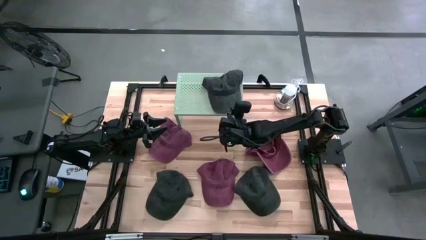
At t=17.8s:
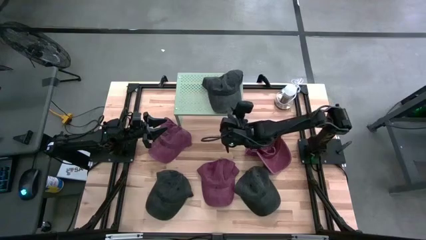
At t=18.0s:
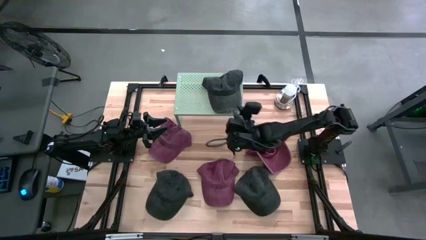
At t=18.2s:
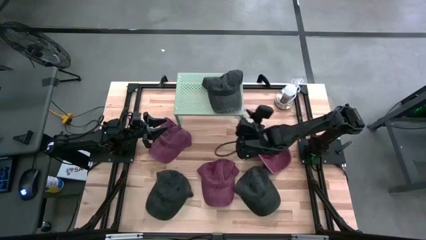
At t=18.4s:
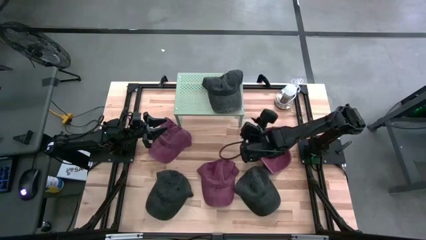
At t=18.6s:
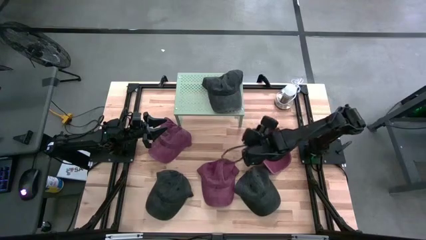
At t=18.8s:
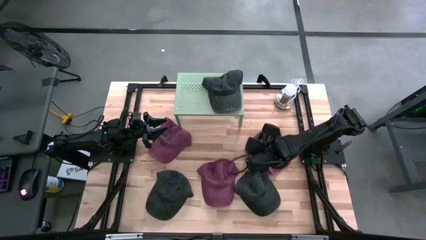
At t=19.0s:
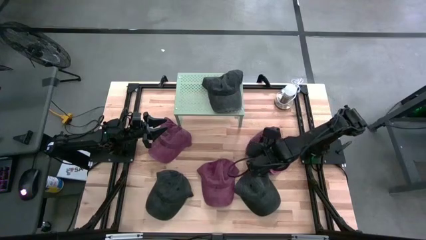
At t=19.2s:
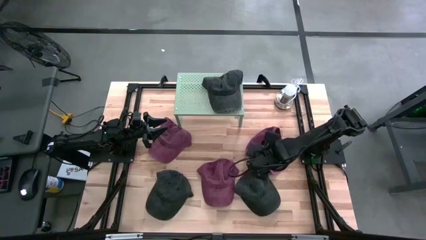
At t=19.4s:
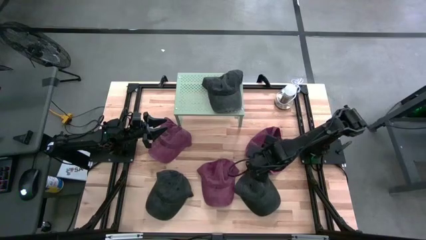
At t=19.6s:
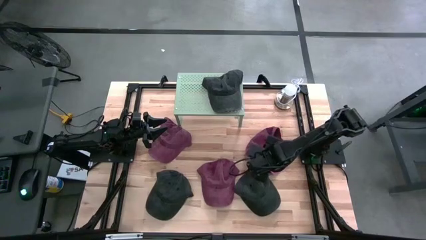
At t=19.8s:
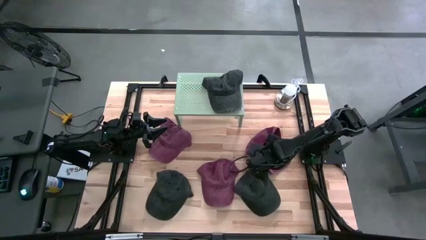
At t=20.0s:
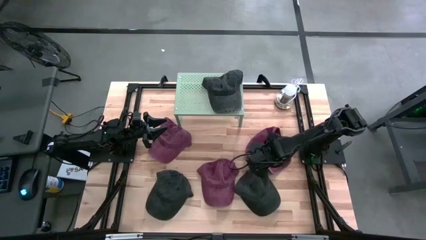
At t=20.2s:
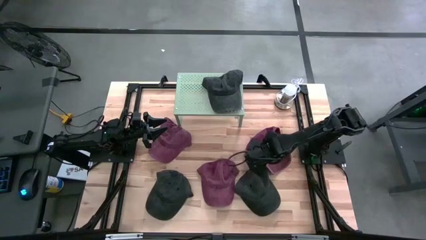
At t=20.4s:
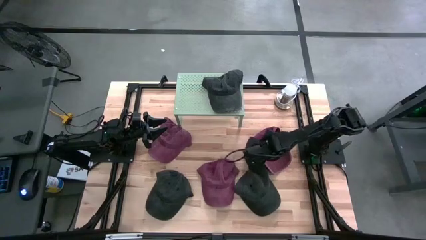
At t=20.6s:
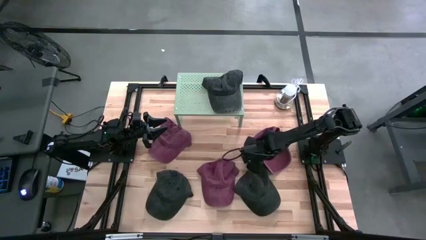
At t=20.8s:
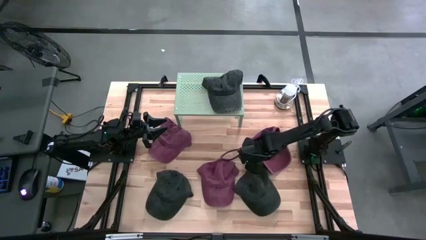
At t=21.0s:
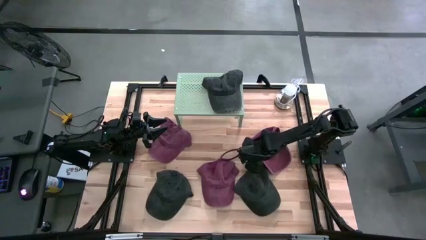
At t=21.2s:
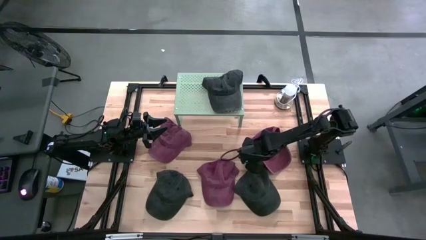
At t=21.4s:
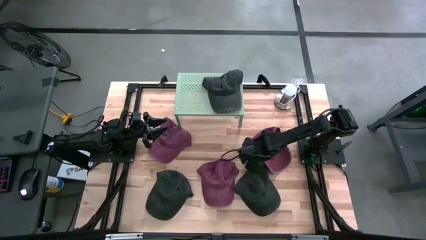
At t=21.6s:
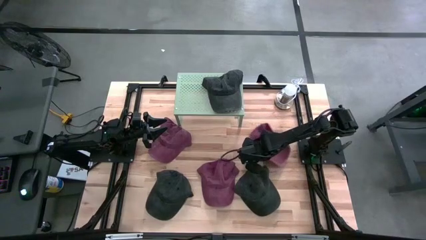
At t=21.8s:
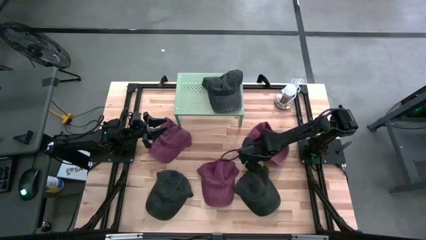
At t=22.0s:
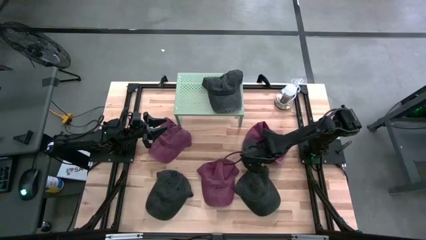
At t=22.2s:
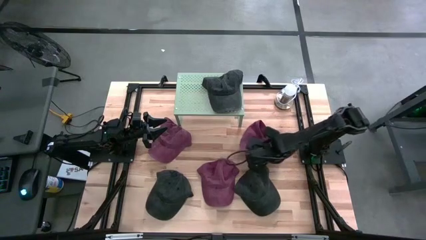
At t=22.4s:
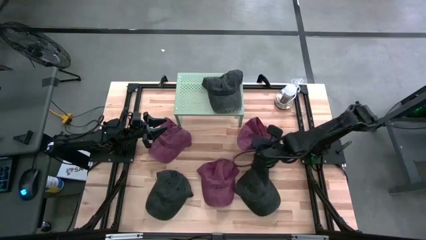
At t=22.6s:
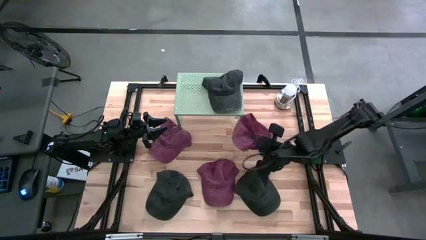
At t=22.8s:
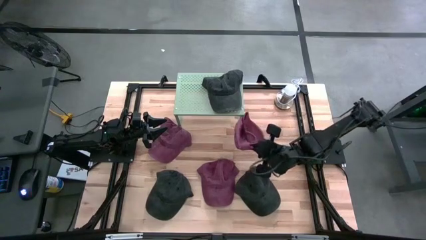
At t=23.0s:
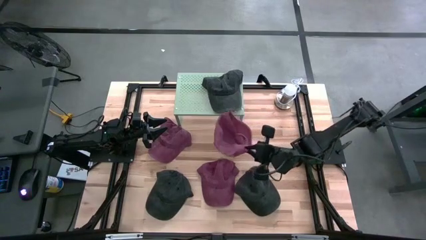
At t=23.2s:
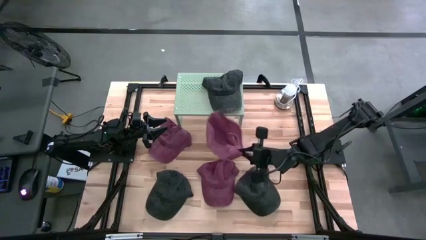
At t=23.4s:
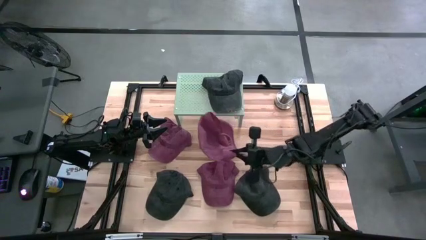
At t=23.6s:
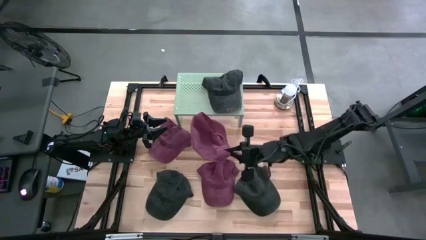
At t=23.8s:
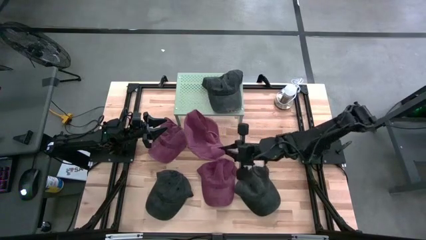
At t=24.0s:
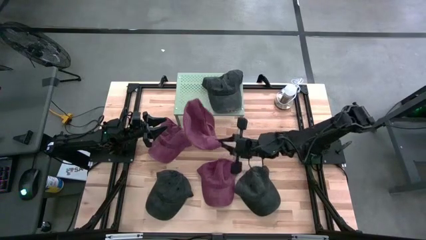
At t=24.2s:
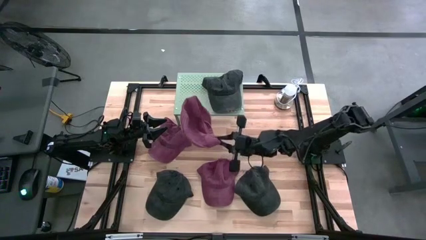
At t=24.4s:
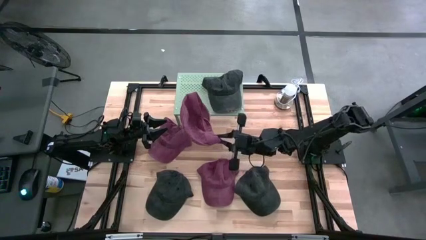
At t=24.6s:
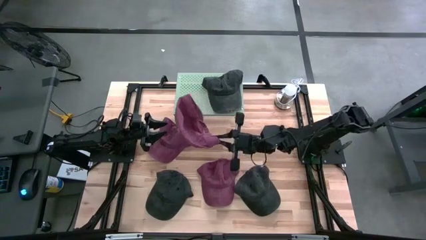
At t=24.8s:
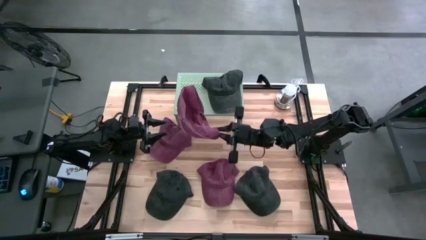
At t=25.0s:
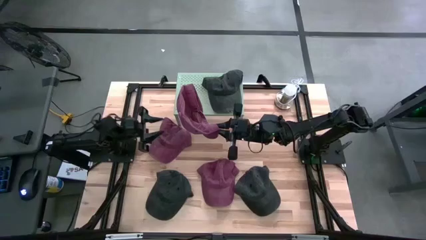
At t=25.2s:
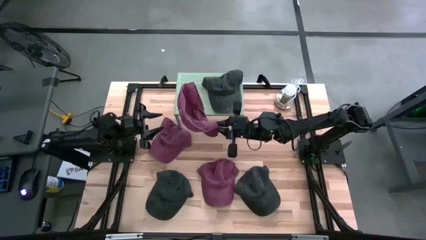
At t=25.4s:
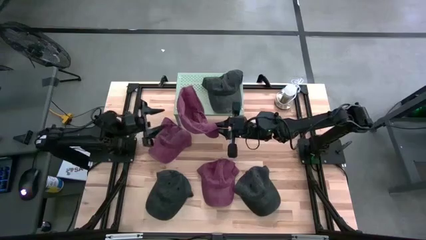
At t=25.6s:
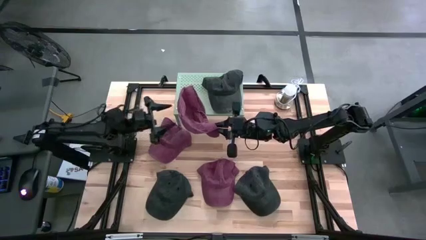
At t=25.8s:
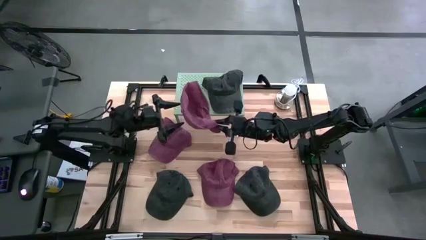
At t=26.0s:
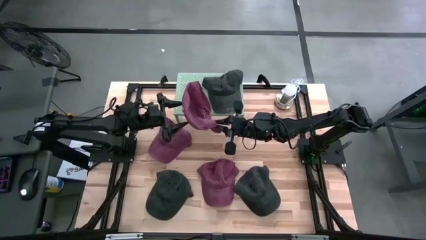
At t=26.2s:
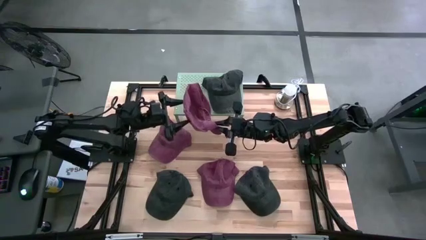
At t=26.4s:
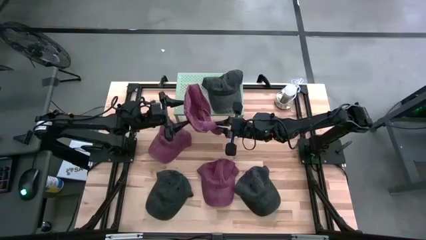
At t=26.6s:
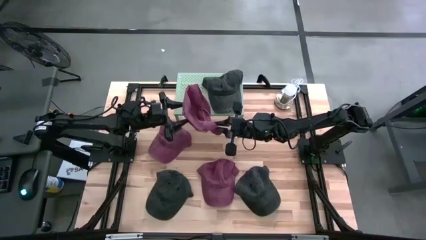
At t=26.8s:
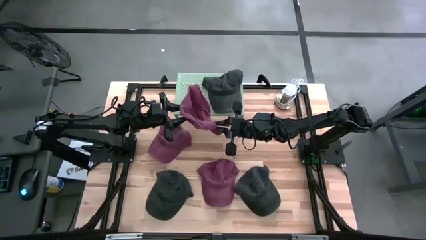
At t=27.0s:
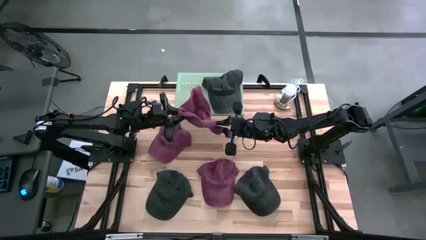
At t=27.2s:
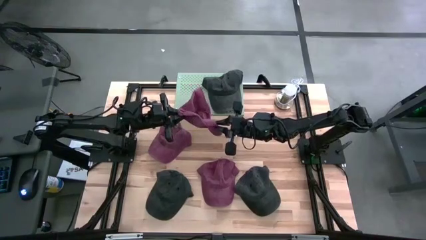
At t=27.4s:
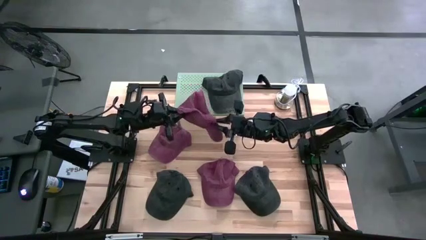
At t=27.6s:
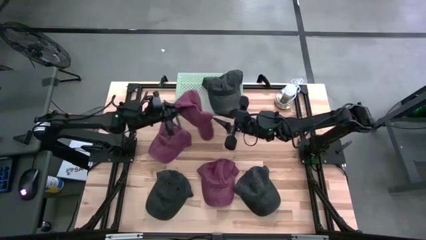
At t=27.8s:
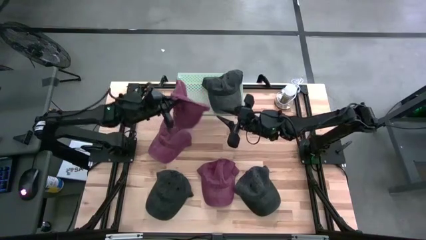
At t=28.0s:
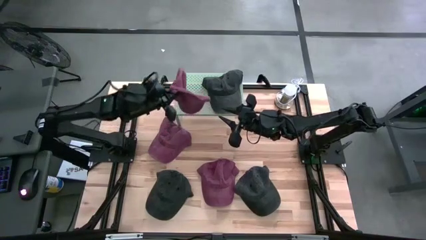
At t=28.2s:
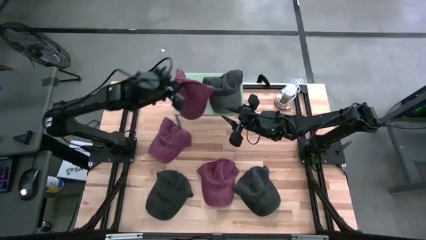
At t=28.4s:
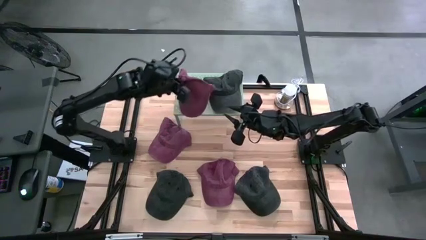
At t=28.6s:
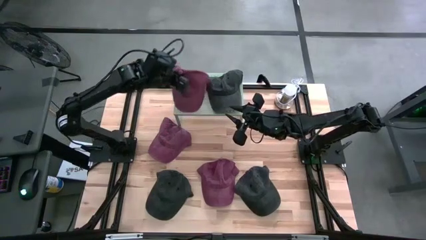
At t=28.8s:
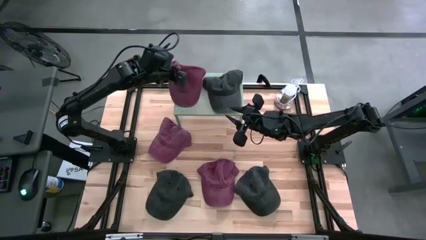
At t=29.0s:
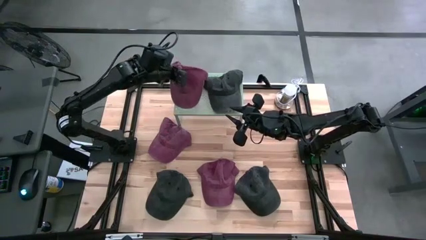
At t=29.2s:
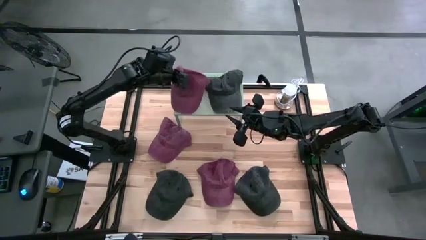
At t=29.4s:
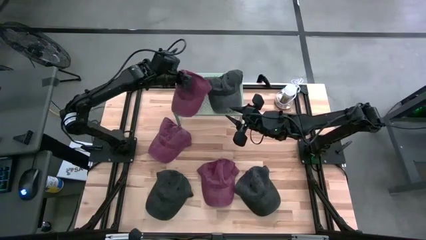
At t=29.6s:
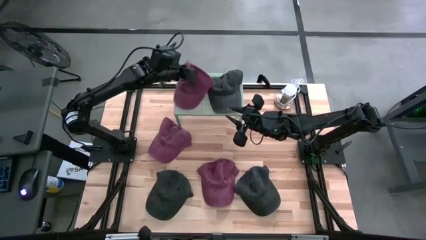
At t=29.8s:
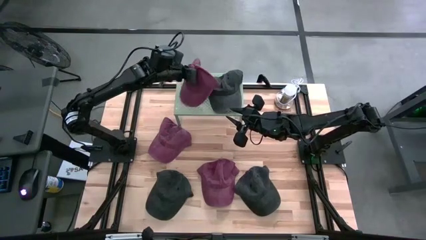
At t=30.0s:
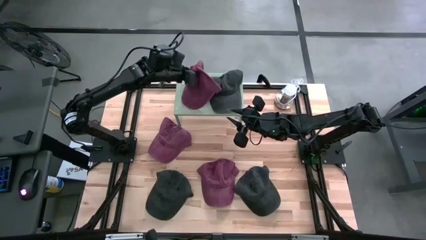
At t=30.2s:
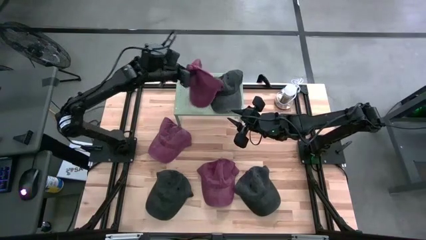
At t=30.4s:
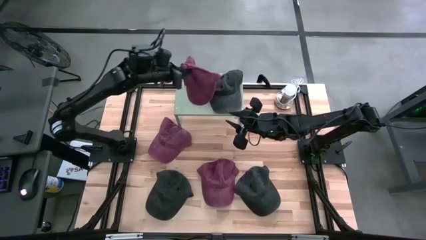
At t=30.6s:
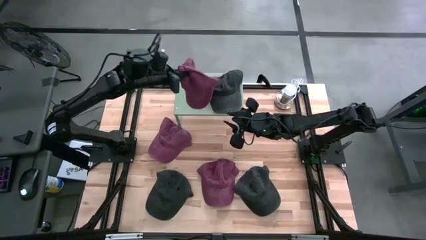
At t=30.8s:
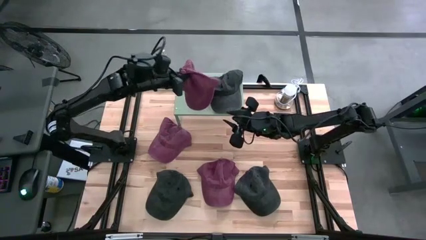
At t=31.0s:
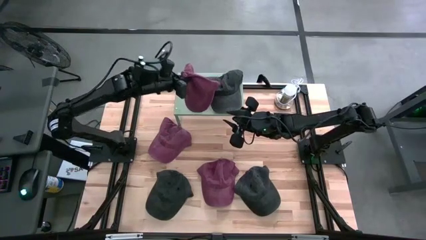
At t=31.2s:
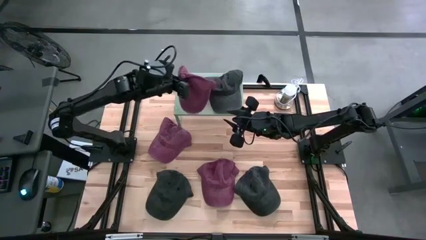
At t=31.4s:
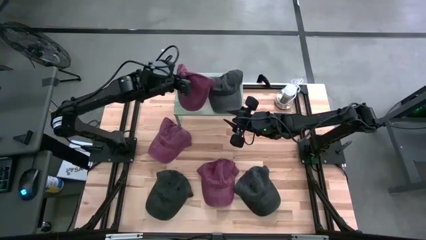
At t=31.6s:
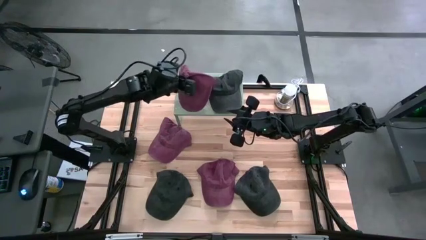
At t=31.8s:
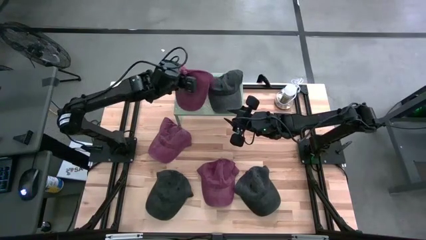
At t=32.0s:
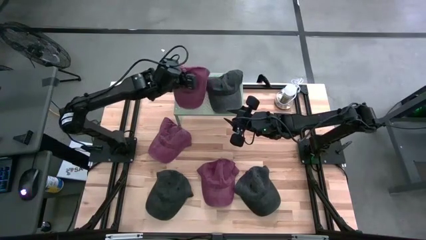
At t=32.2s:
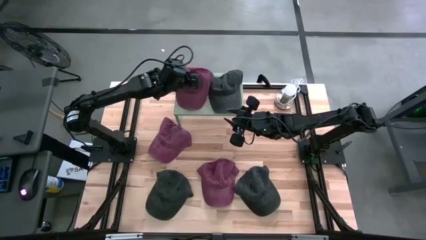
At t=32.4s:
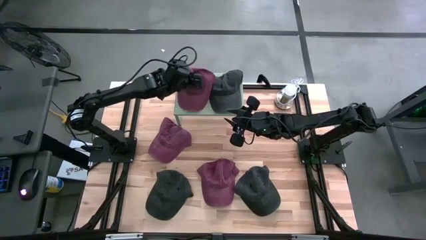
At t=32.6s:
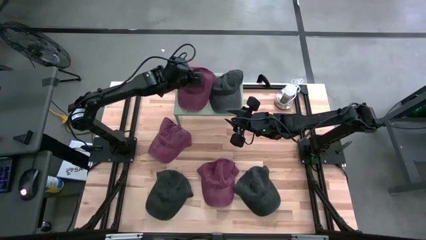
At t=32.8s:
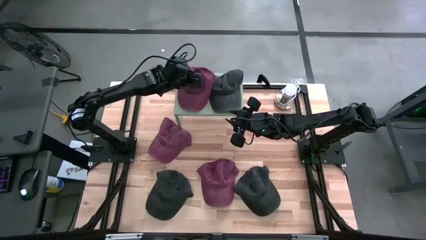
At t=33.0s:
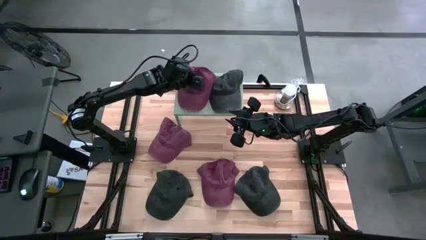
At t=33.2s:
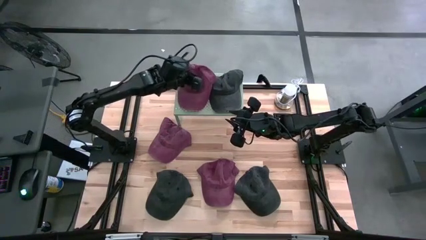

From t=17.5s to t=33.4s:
Task: Pick & Place hat
Put the right red cap on the shelf
